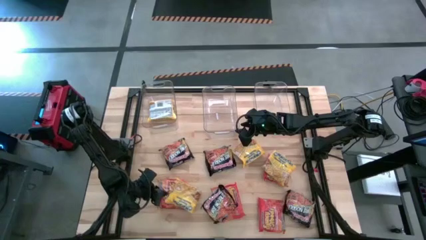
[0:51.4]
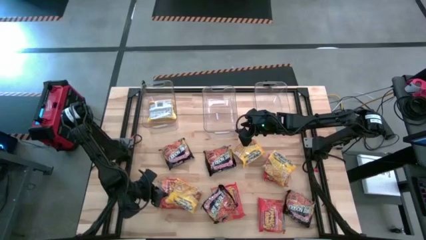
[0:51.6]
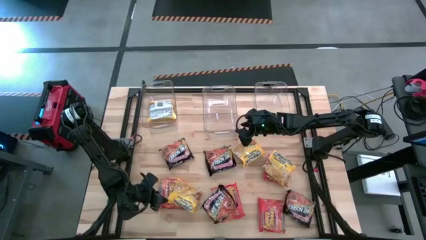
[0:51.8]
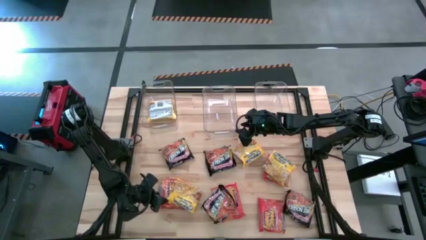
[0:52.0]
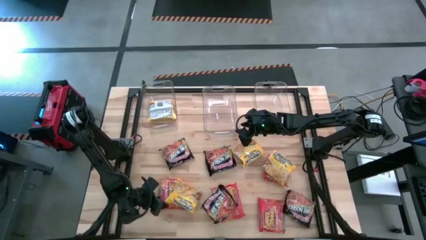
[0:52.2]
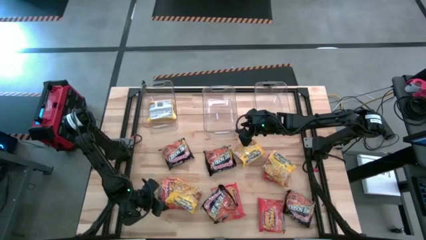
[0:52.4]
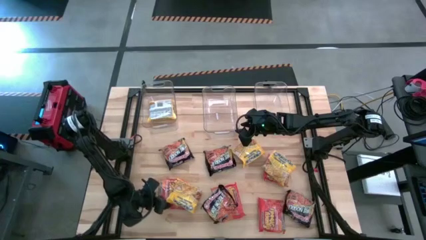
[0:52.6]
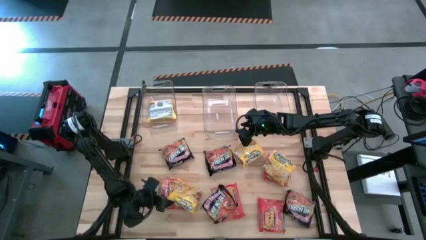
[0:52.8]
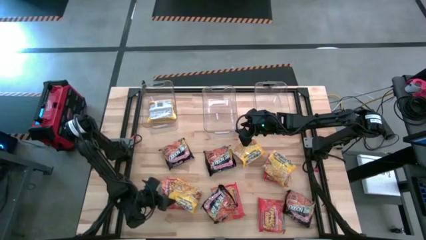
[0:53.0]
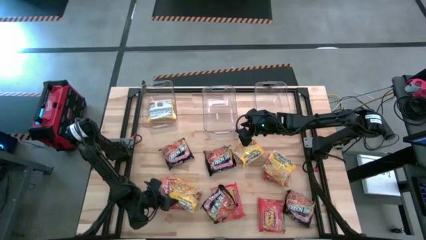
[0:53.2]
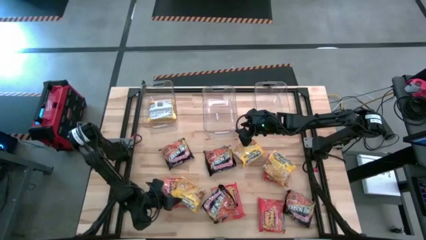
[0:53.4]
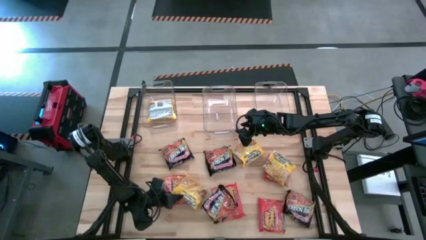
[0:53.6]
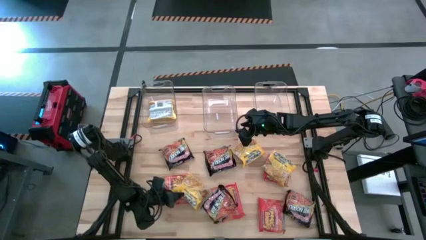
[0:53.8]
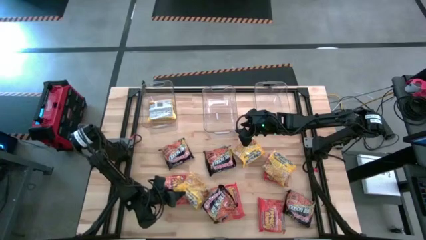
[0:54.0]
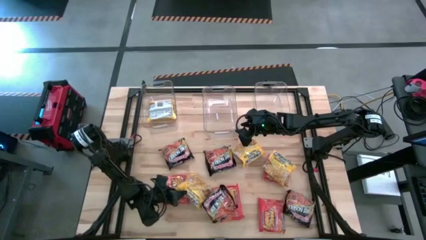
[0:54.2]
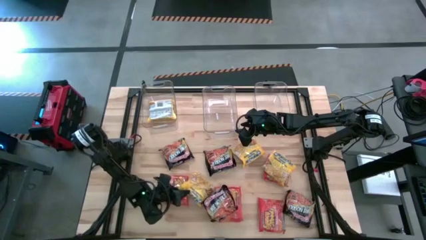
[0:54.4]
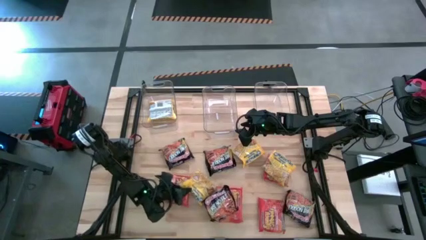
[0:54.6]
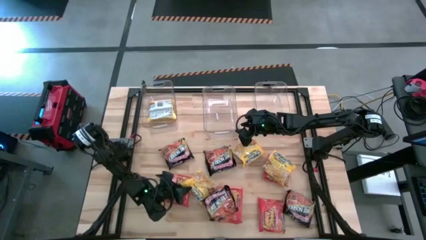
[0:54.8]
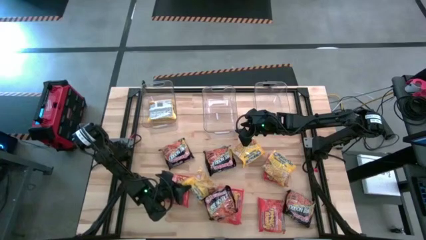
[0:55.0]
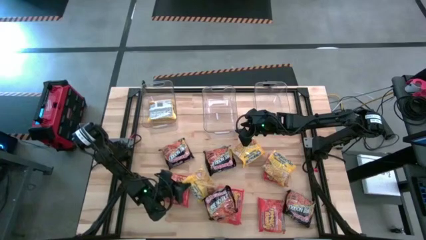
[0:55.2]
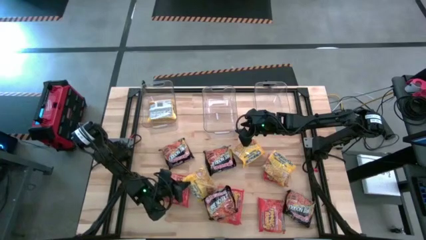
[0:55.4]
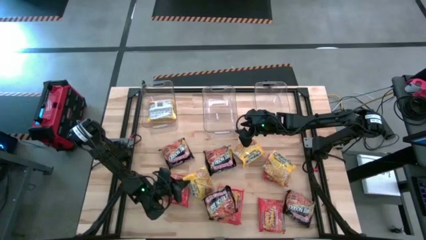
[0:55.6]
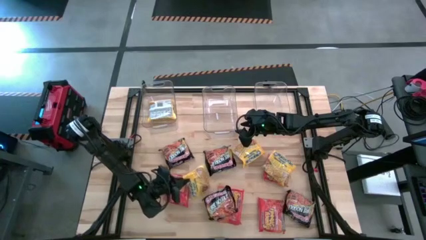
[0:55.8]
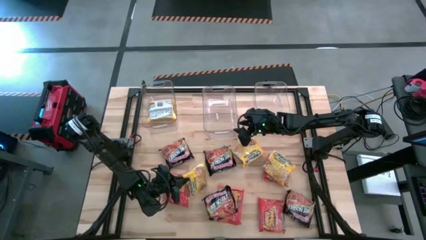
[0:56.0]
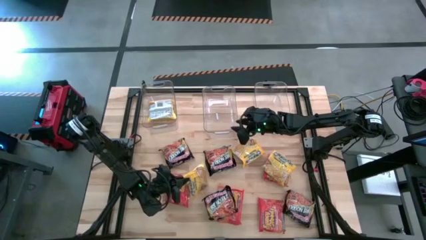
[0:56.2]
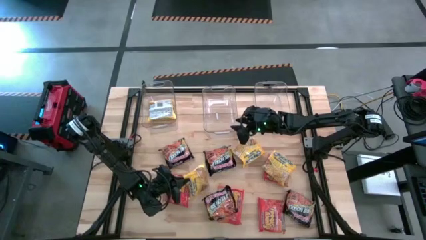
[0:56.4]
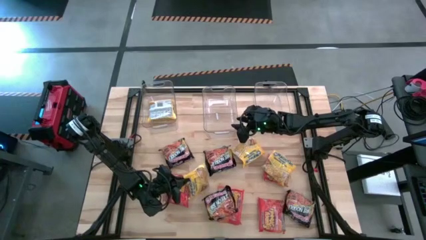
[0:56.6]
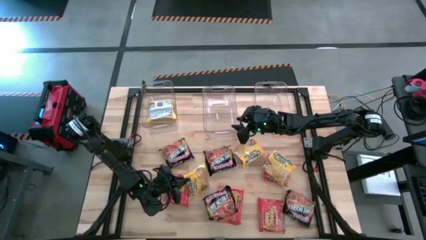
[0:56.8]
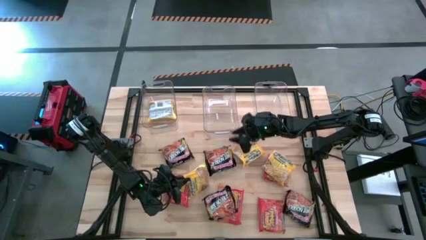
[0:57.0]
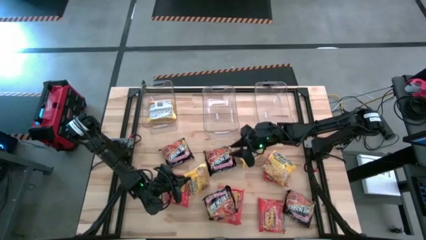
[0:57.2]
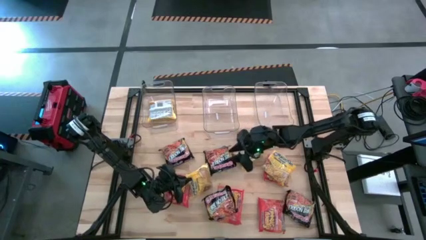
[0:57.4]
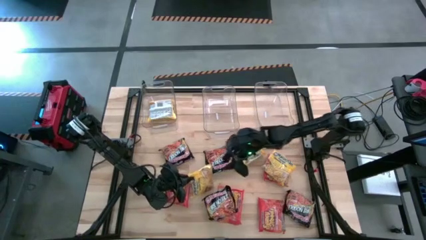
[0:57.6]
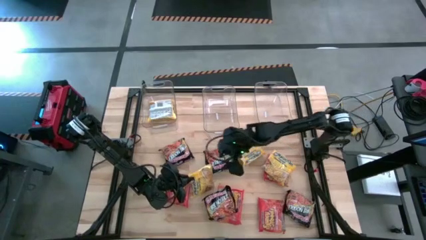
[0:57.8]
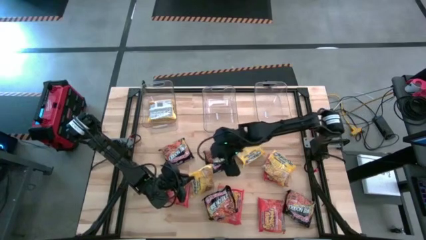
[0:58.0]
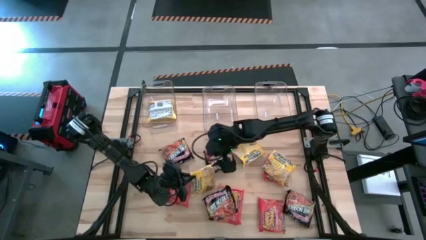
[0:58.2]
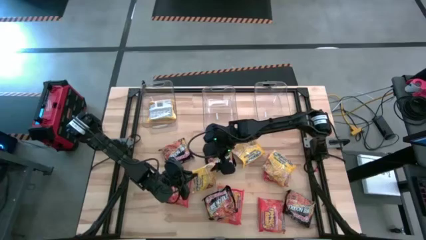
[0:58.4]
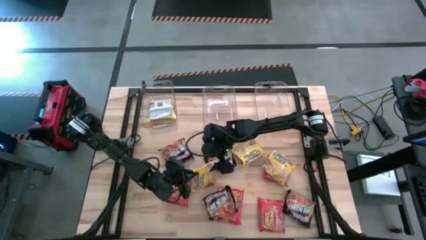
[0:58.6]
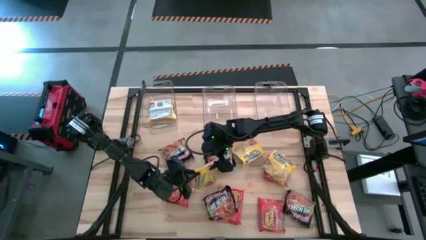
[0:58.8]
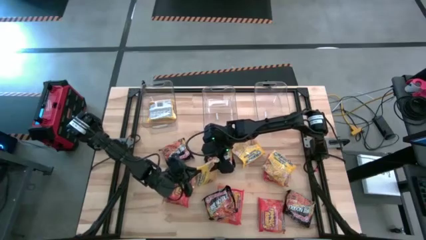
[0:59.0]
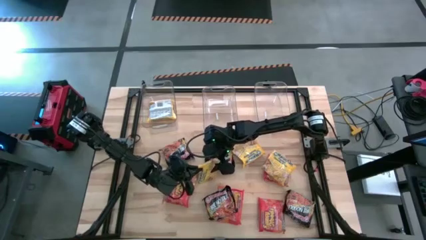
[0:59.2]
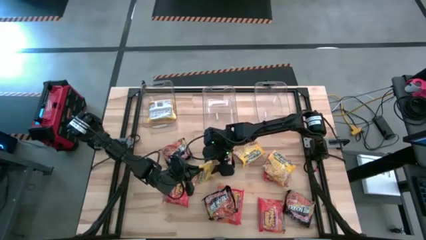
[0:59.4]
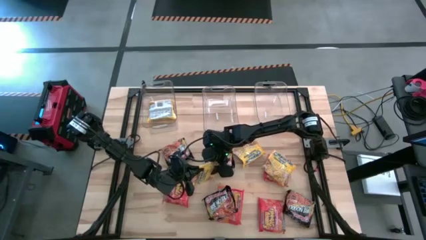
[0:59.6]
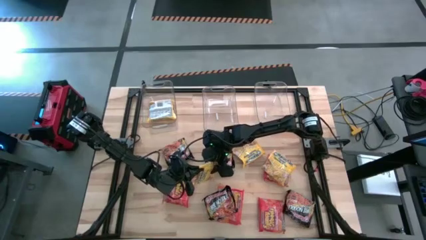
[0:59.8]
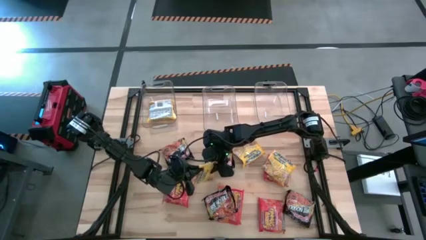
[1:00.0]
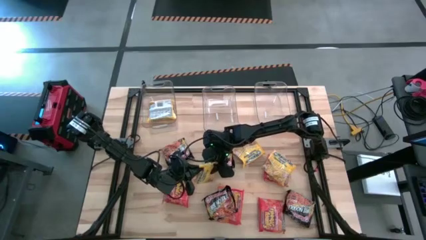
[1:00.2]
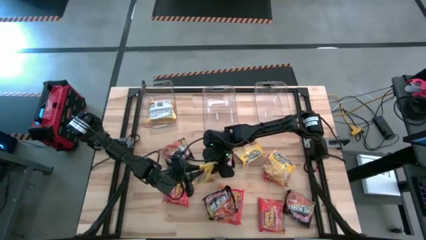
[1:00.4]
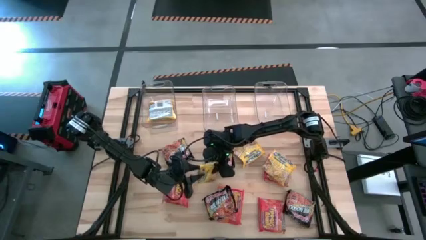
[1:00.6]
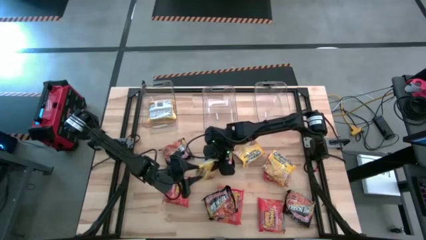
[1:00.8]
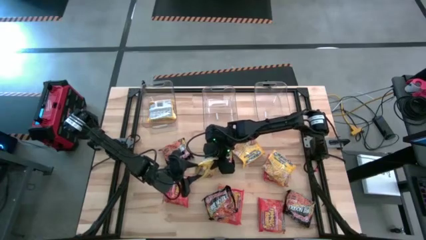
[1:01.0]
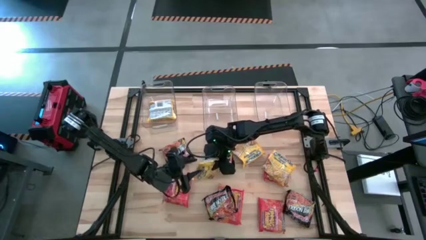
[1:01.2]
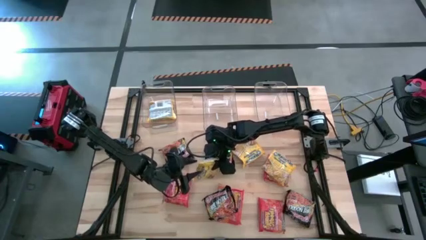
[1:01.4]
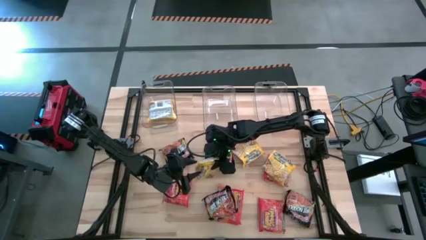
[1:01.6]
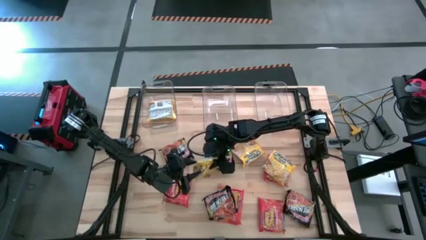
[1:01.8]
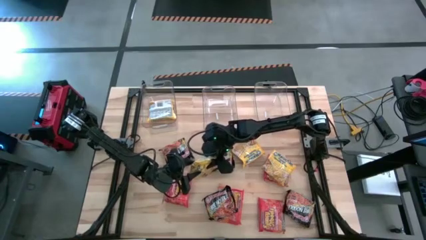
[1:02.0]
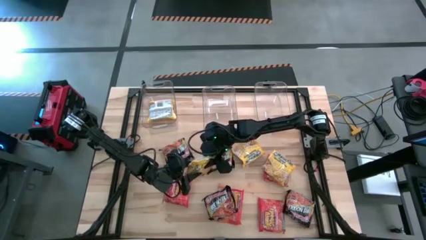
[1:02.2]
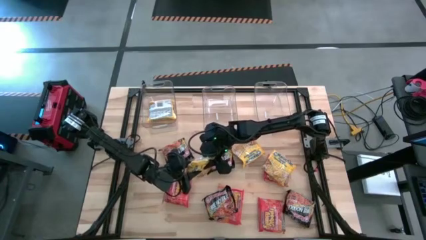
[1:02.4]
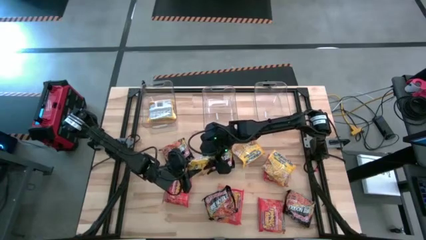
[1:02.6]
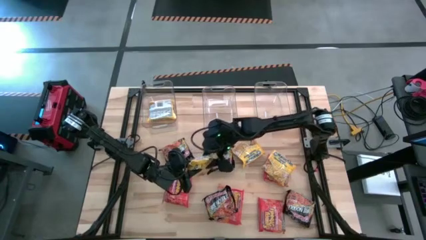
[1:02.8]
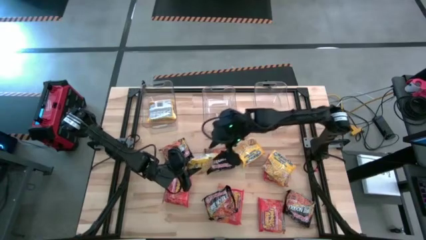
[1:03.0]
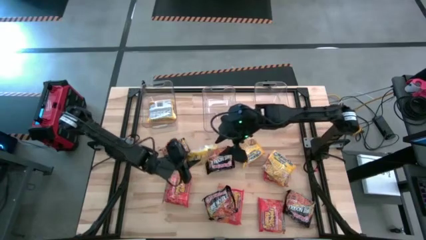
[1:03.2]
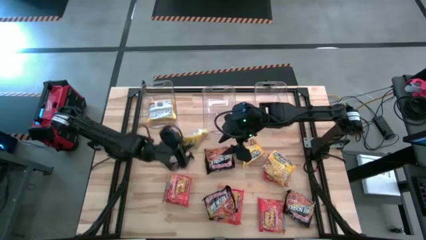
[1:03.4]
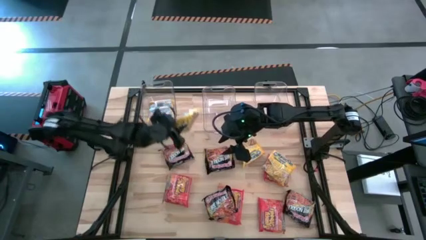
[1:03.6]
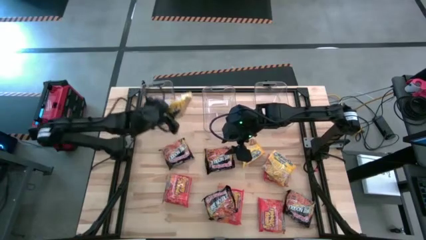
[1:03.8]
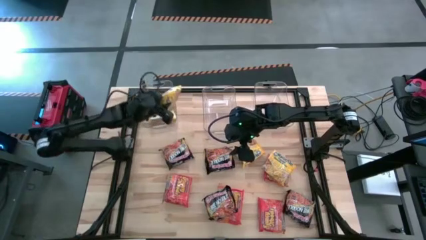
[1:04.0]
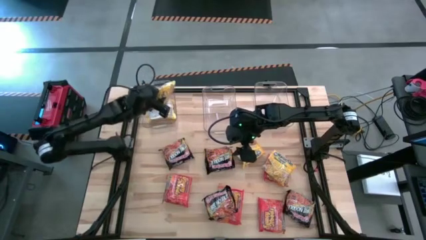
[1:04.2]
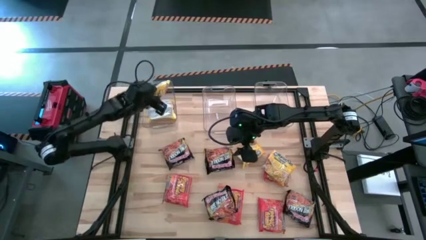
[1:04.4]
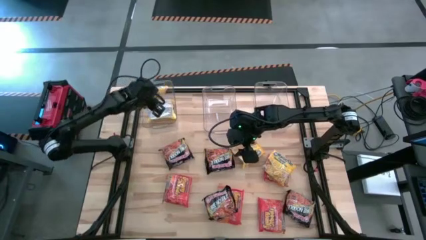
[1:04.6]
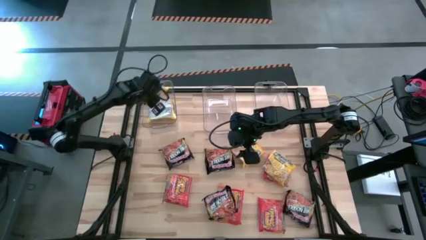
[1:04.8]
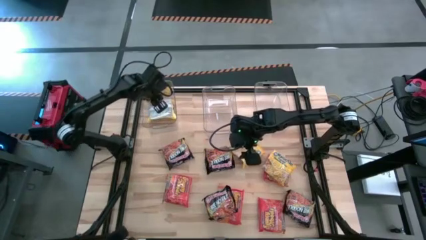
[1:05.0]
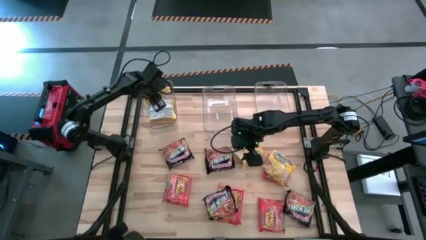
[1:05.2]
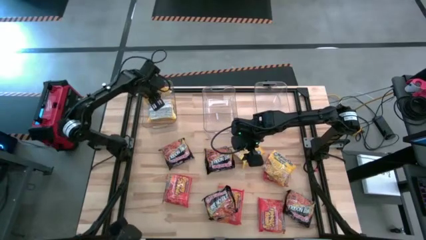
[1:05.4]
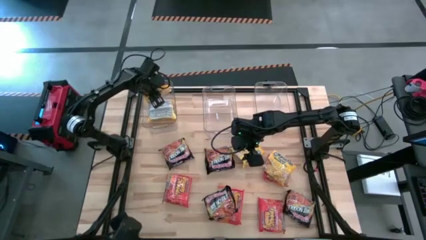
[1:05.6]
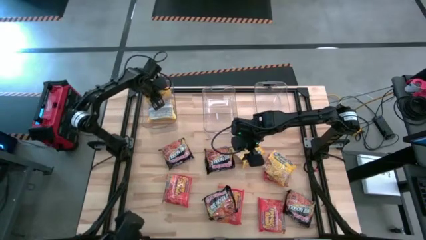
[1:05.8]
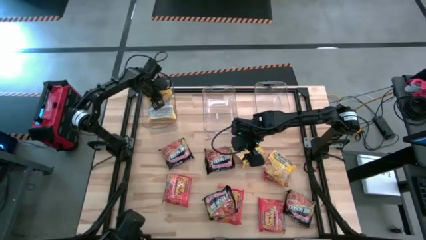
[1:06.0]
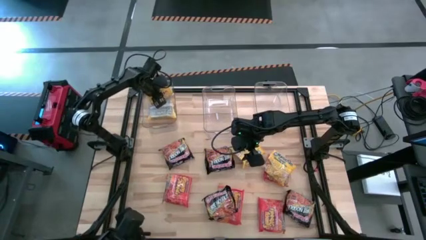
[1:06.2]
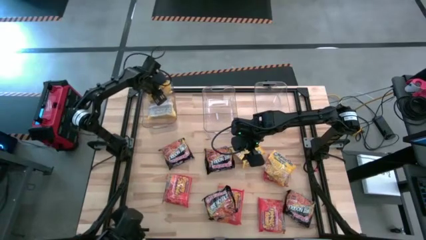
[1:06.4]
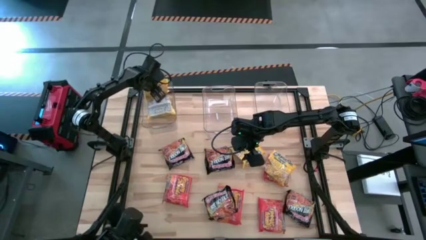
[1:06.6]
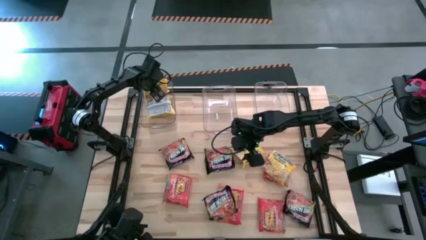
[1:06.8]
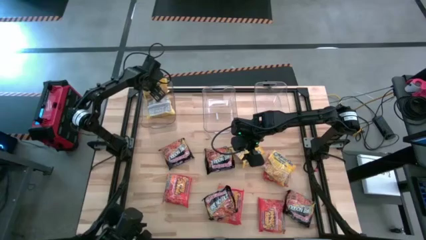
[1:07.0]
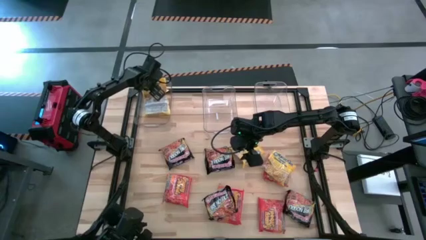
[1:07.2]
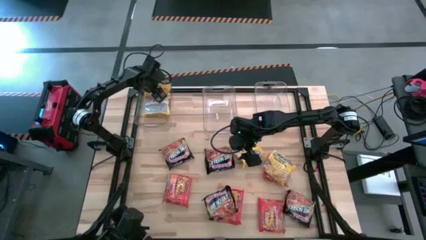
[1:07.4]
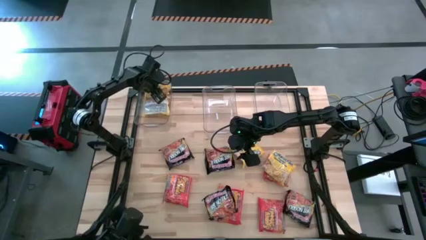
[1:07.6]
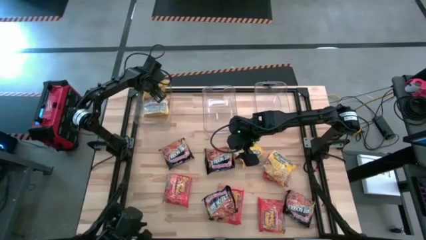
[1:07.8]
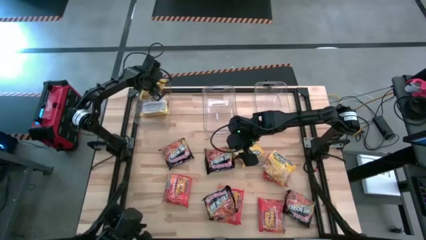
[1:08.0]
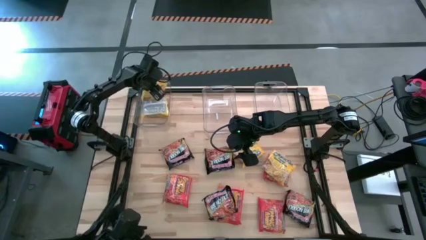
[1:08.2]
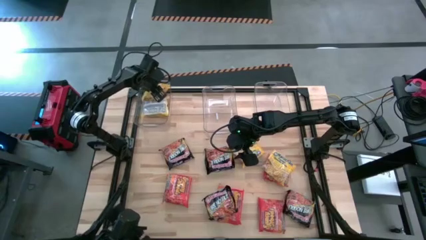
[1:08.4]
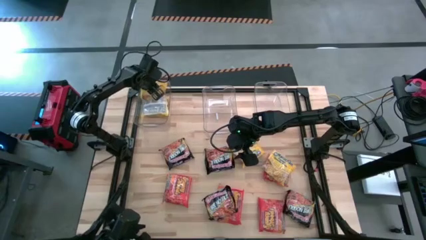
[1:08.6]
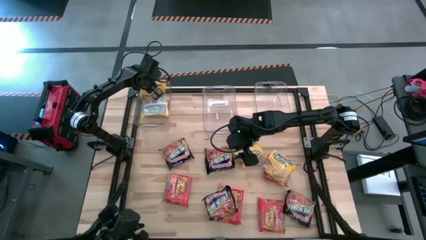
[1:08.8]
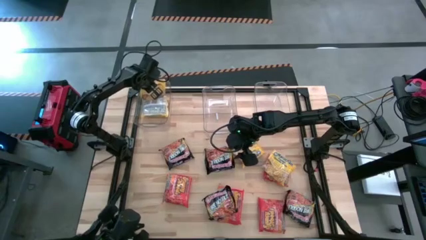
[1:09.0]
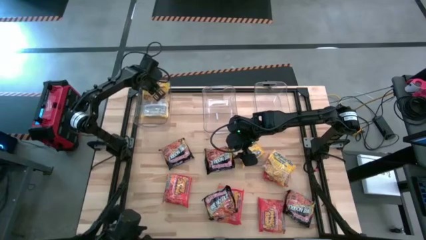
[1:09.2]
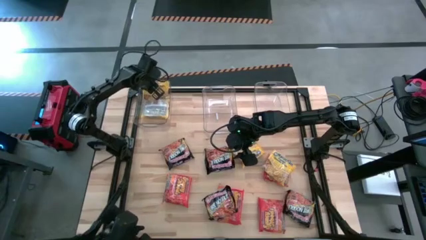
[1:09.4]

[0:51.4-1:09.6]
Task: Sort Maruchan noodles
Put the yellow noodle pack into the left transparent bin
